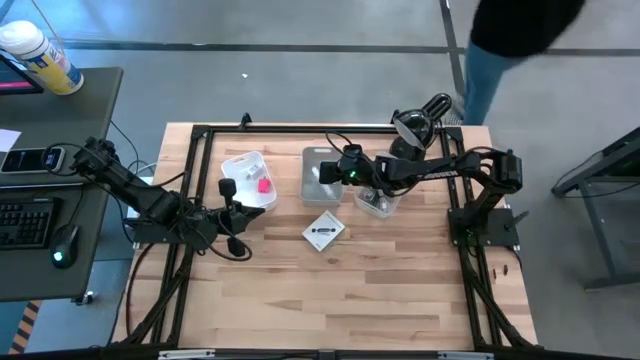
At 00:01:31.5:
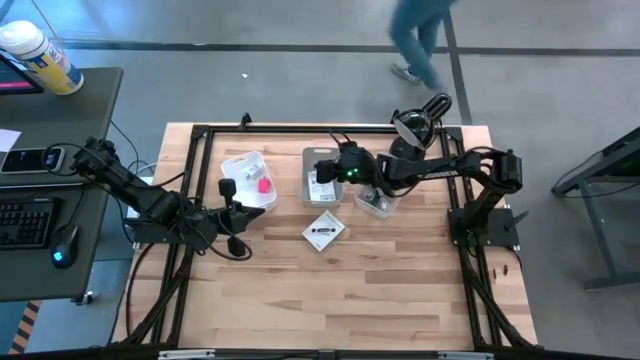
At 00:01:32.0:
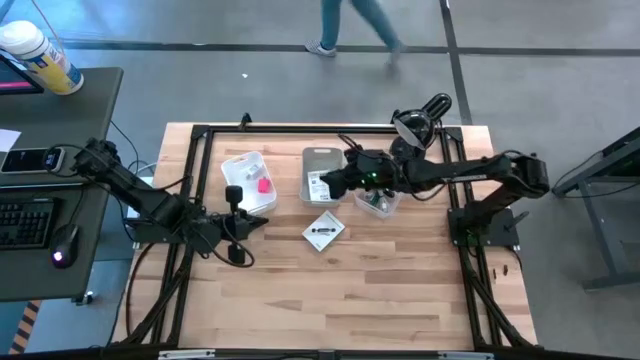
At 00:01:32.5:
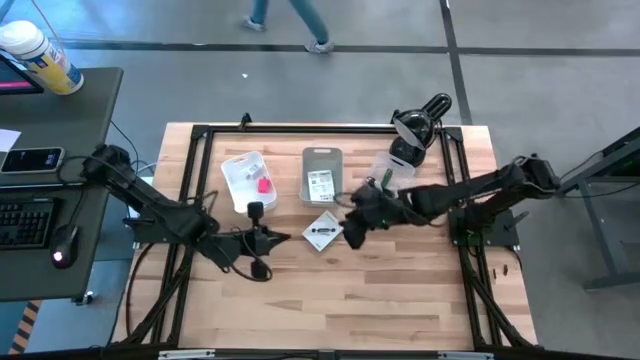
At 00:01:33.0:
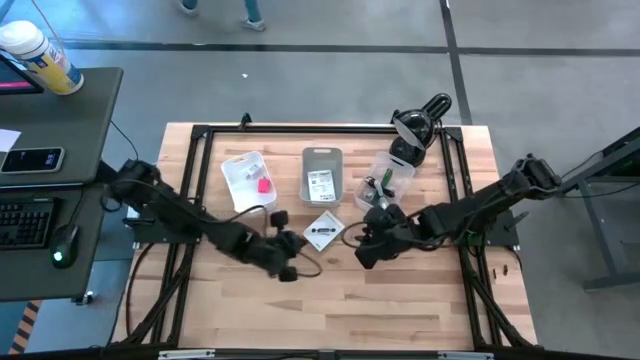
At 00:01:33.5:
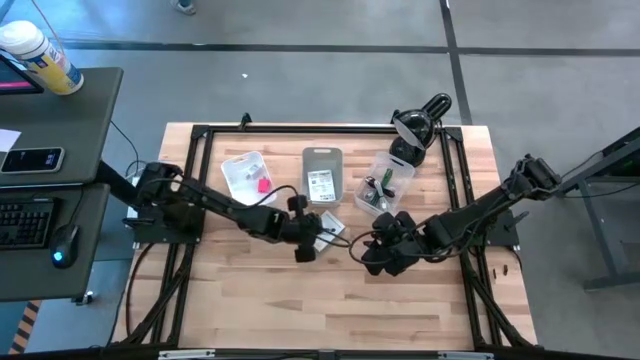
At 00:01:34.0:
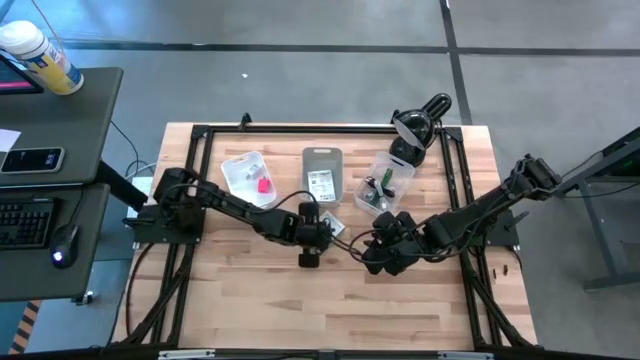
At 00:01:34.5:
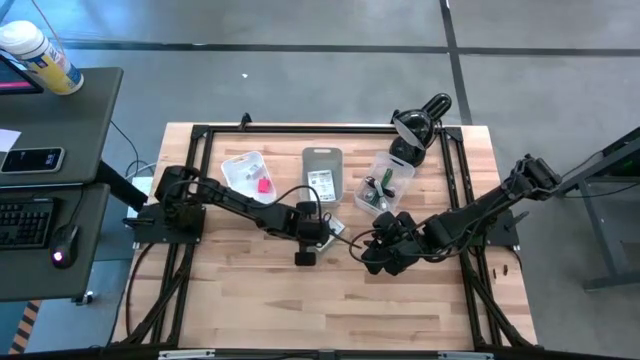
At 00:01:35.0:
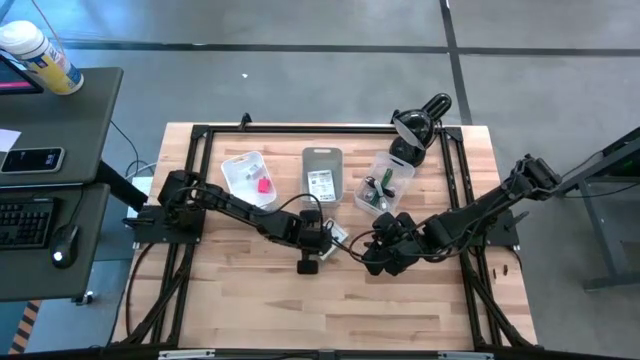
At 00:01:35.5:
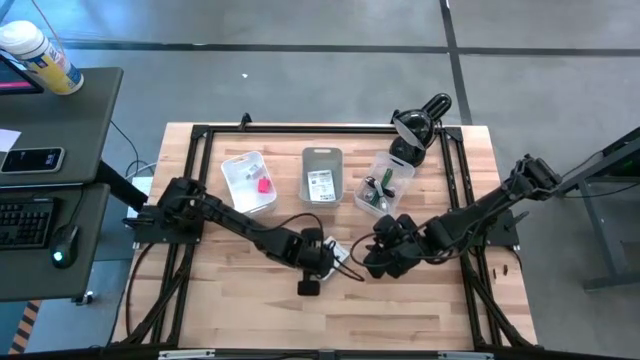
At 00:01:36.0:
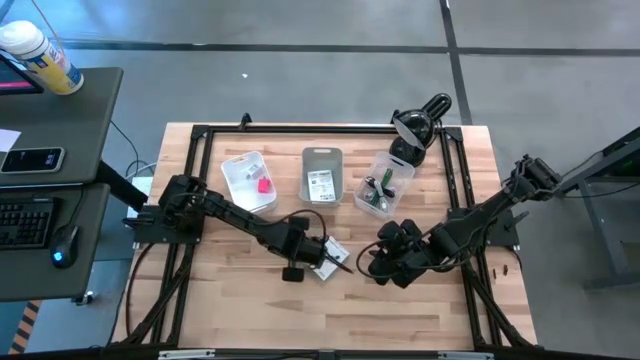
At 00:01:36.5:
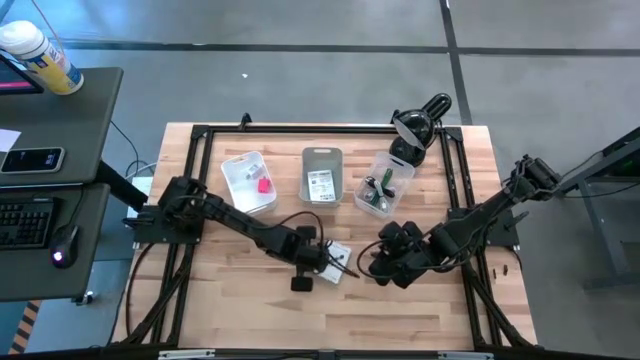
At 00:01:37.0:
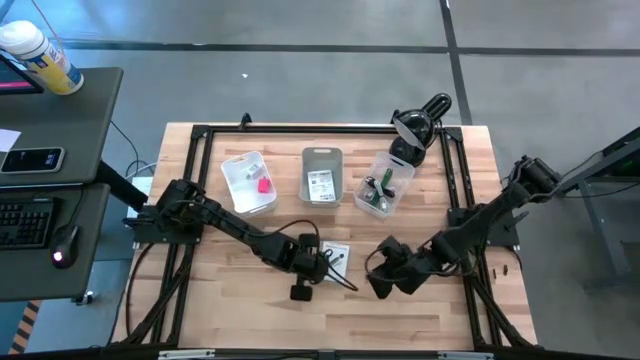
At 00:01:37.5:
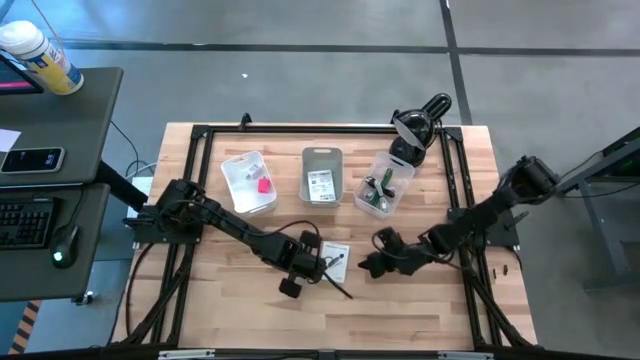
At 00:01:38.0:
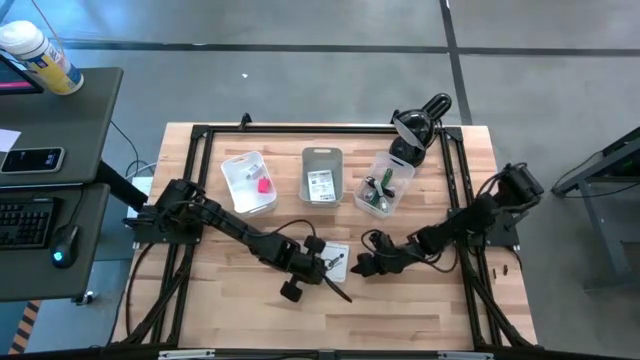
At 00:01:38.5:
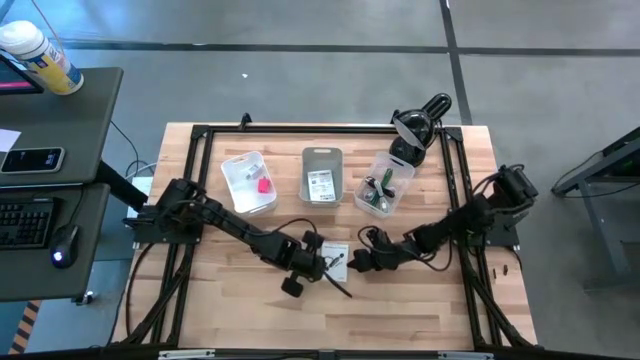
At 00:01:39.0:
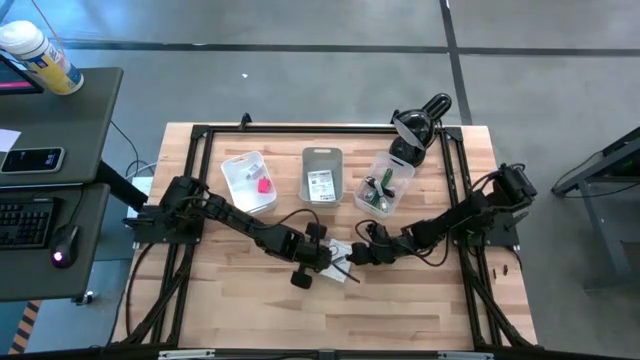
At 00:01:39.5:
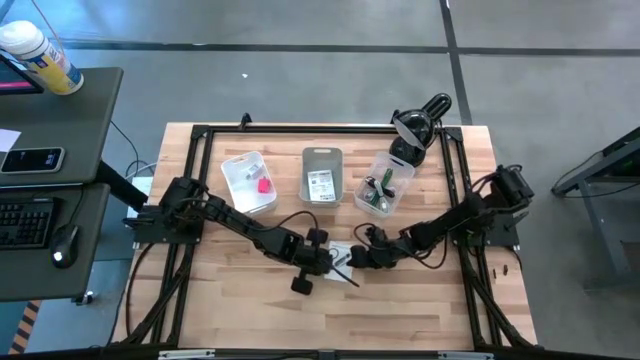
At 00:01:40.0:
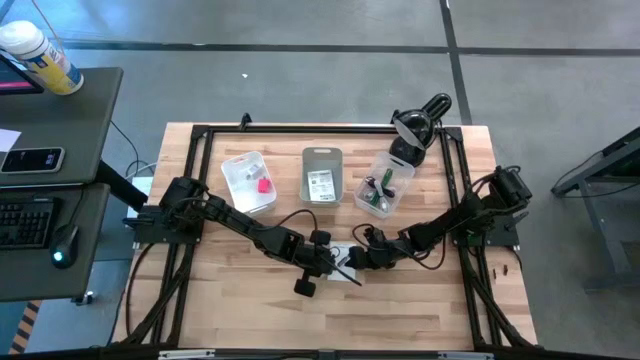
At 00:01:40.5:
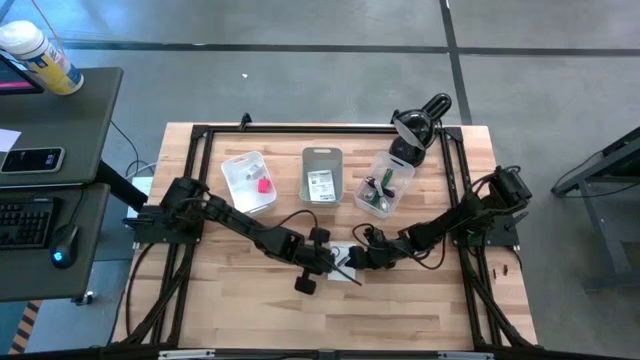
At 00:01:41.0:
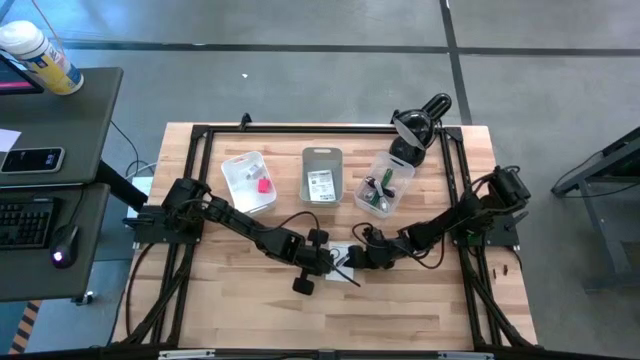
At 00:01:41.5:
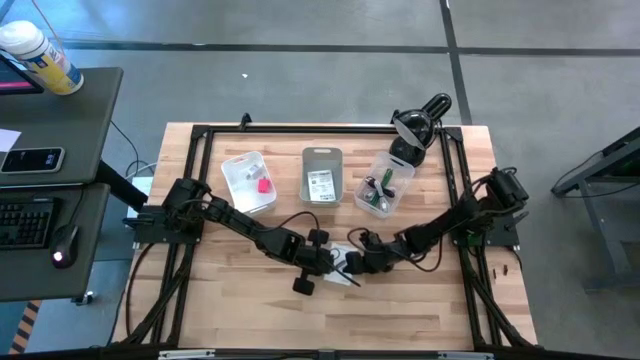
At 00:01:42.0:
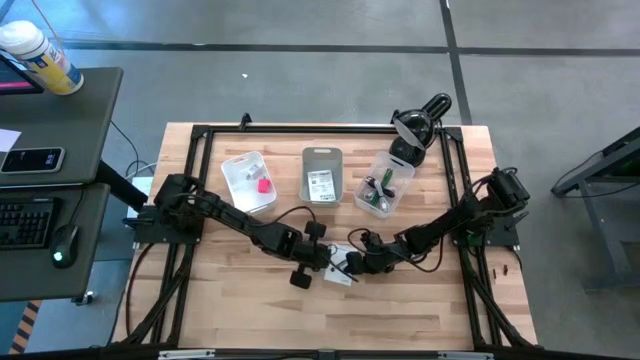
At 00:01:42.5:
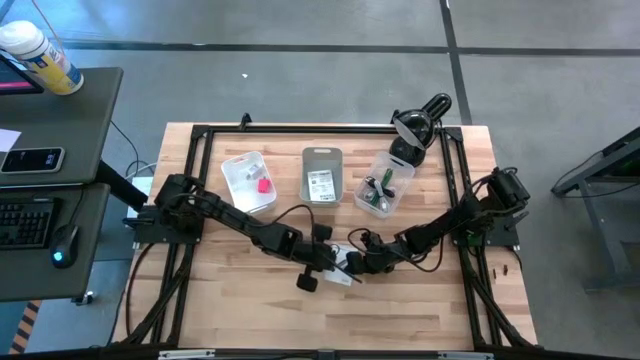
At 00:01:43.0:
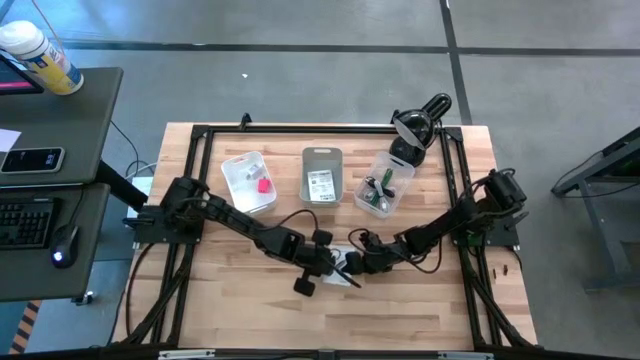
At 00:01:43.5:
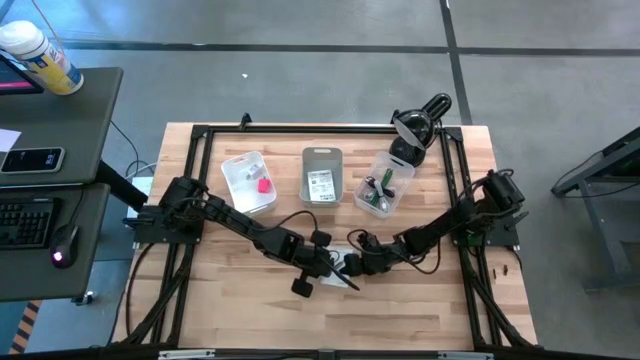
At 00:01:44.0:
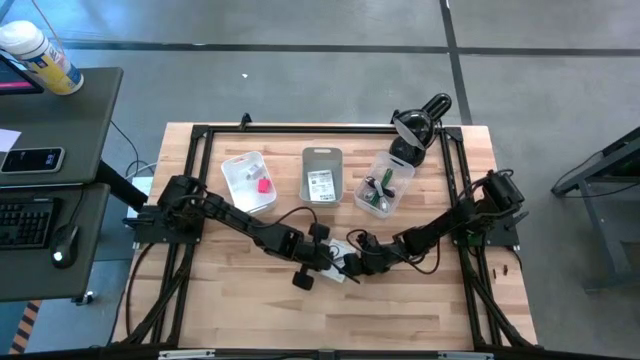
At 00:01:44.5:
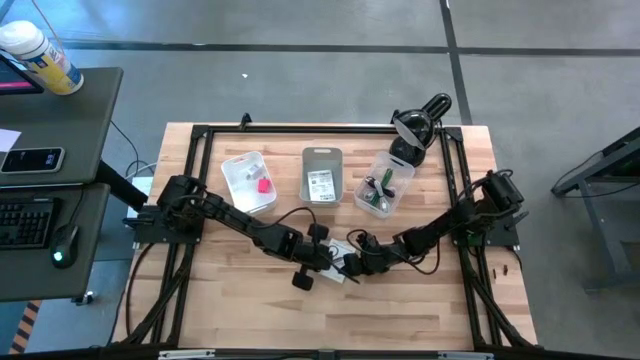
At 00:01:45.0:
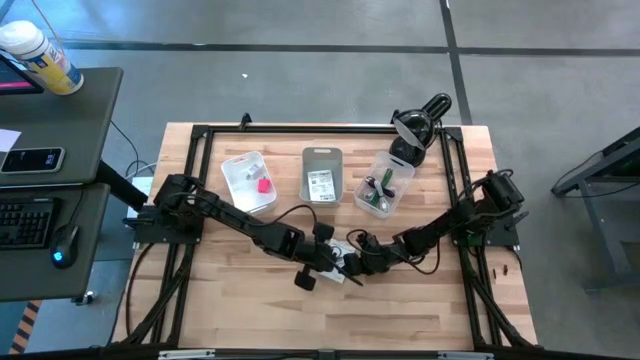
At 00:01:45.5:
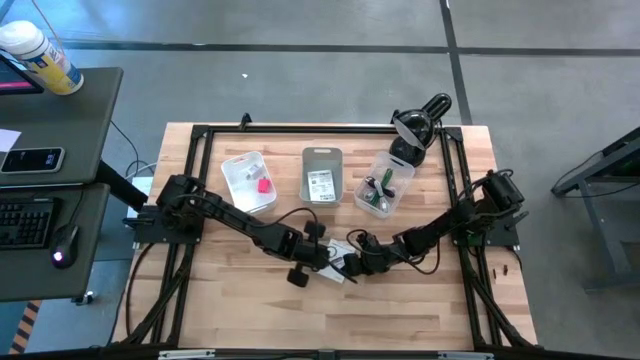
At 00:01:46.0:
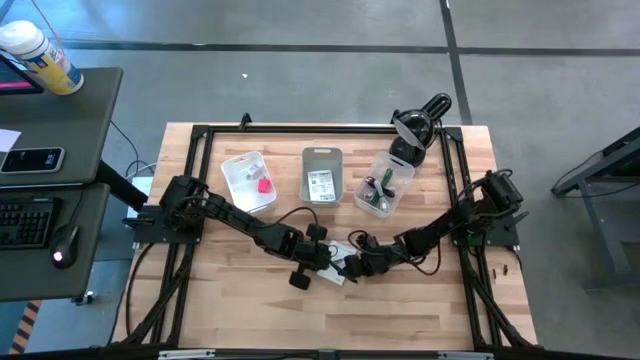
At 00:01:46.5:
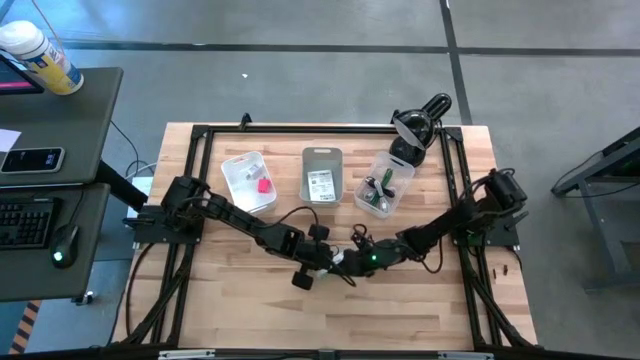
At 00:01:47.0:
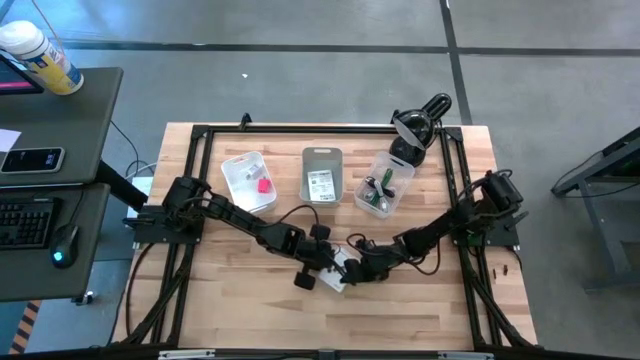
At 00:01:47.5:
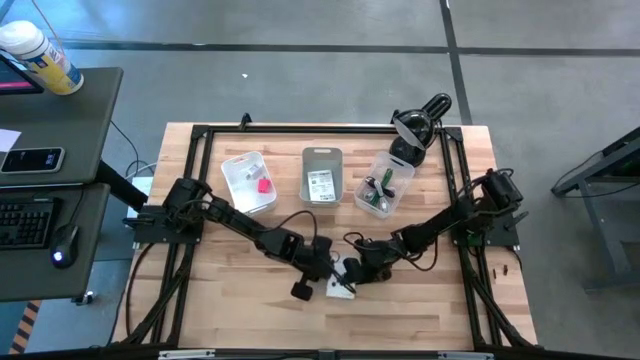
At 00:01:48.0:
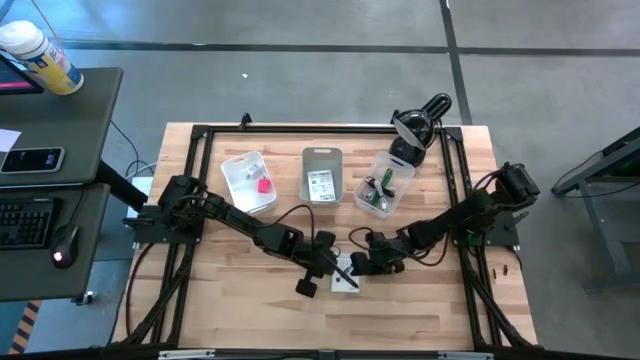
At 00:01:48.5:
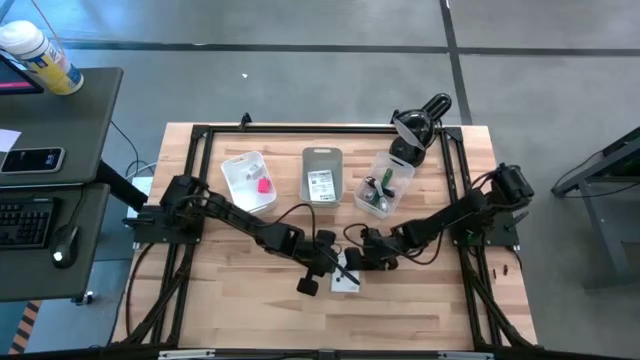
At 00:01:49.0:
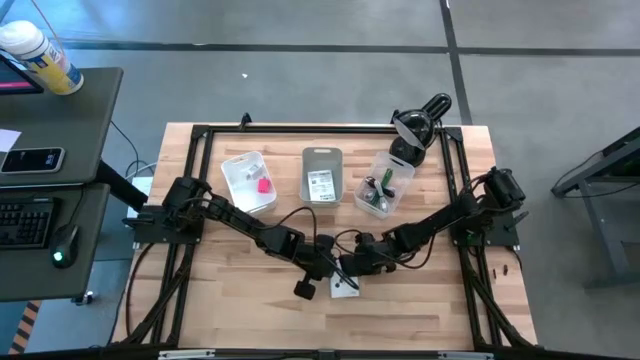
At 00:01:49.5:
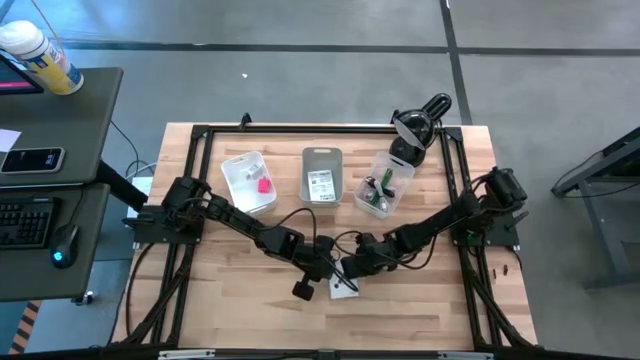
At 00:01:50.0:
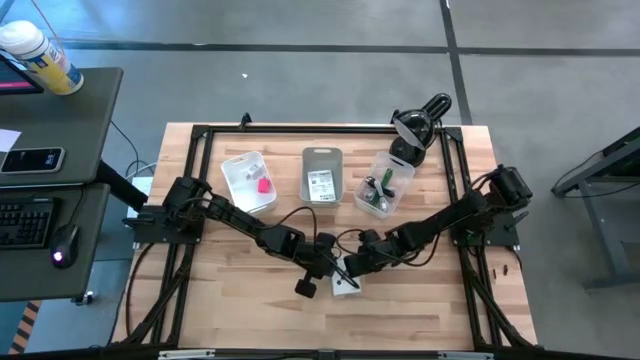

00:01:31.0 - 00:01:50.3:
Task: Pick and place items into bin
Put the white card reader box into the gray bin
